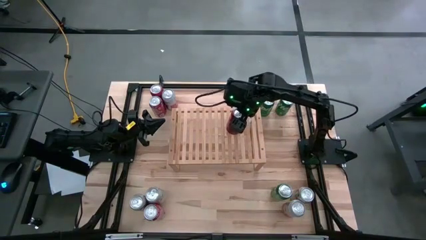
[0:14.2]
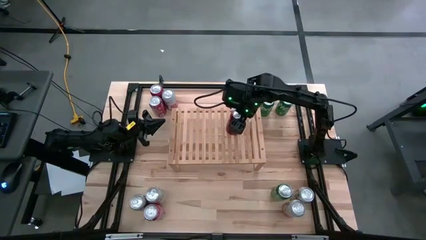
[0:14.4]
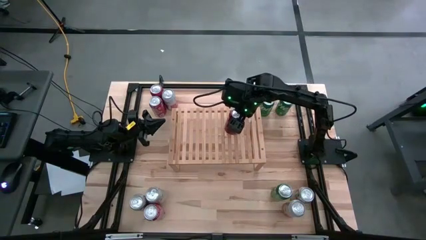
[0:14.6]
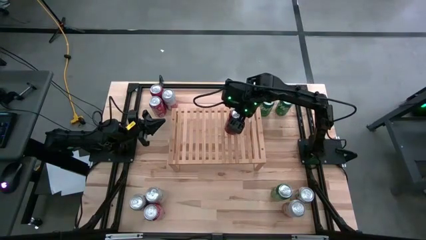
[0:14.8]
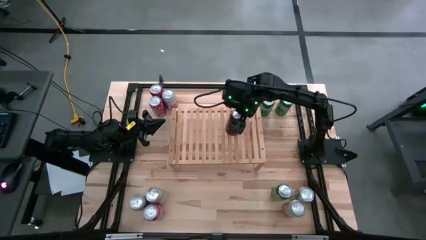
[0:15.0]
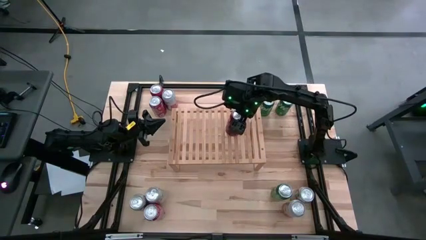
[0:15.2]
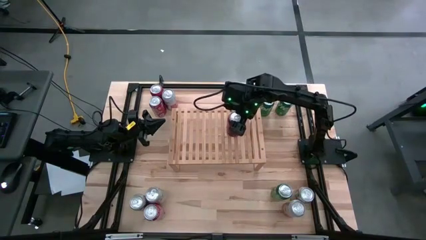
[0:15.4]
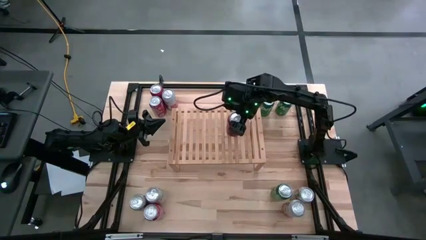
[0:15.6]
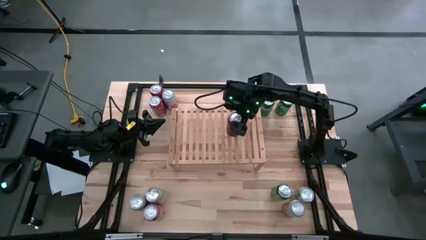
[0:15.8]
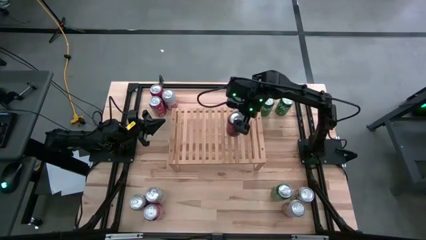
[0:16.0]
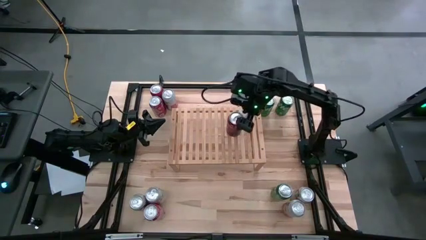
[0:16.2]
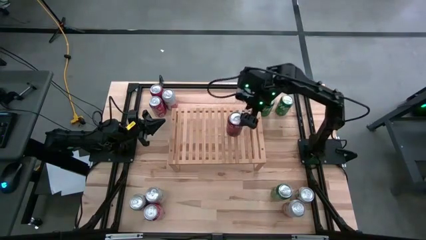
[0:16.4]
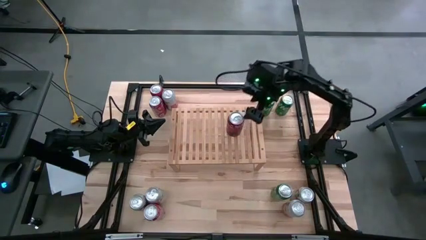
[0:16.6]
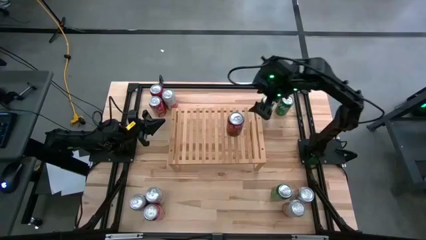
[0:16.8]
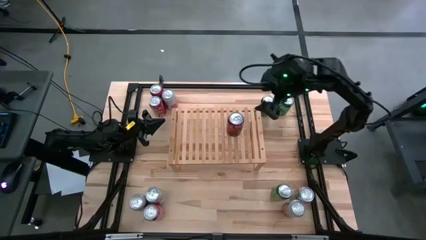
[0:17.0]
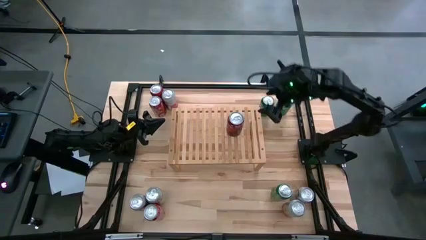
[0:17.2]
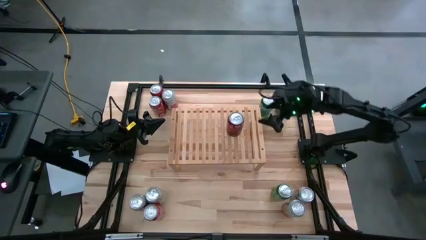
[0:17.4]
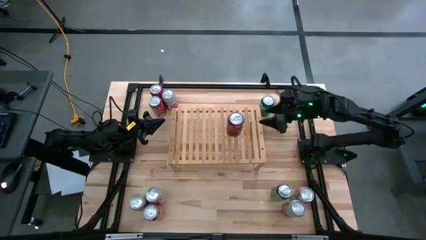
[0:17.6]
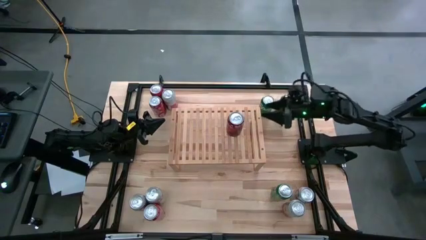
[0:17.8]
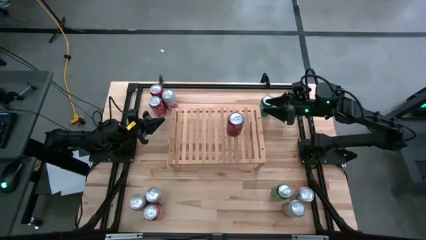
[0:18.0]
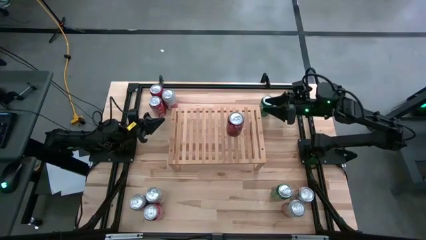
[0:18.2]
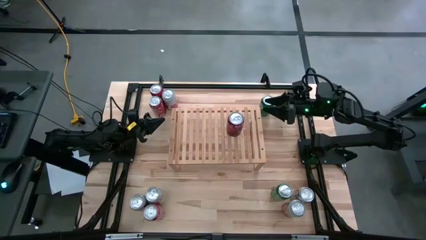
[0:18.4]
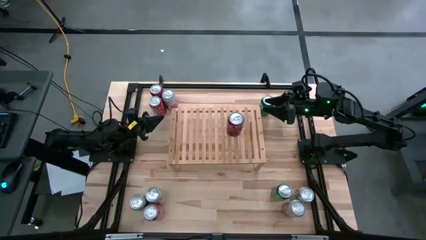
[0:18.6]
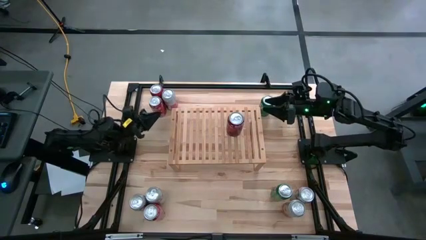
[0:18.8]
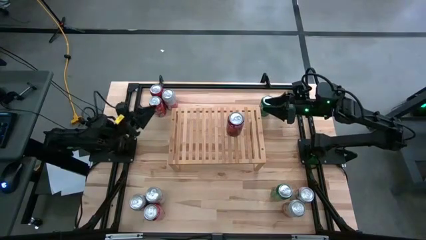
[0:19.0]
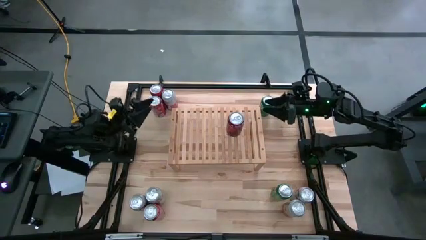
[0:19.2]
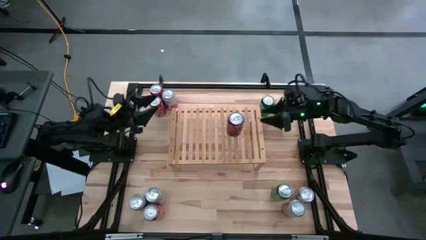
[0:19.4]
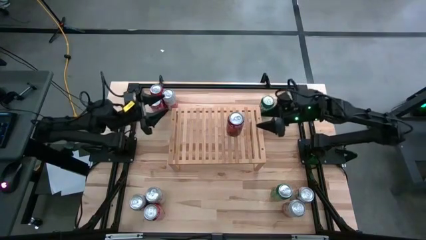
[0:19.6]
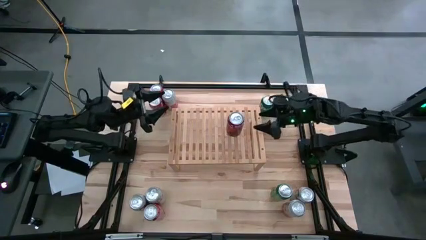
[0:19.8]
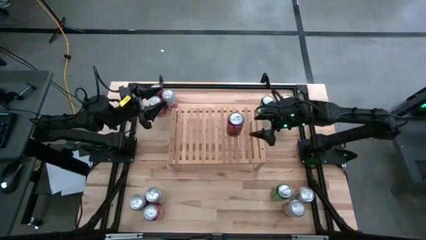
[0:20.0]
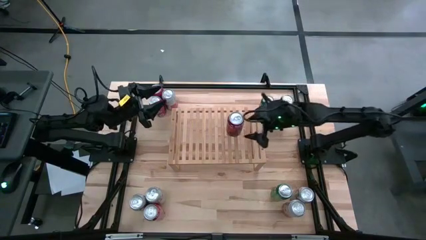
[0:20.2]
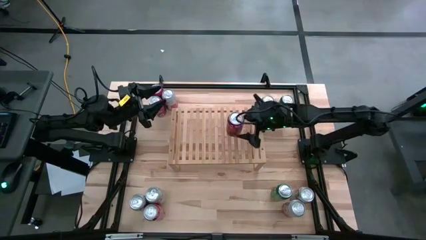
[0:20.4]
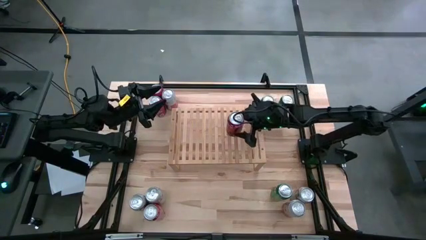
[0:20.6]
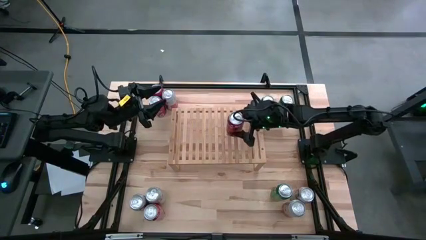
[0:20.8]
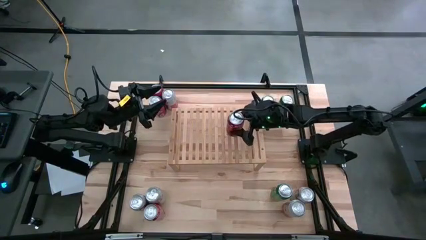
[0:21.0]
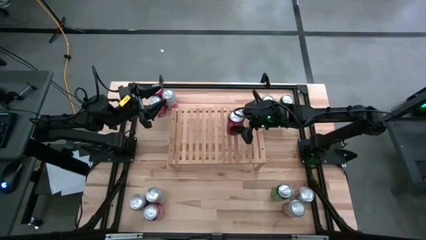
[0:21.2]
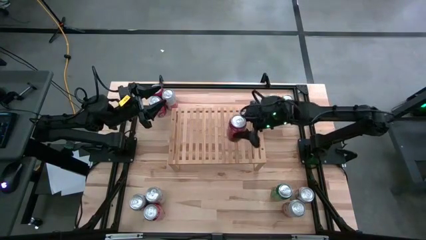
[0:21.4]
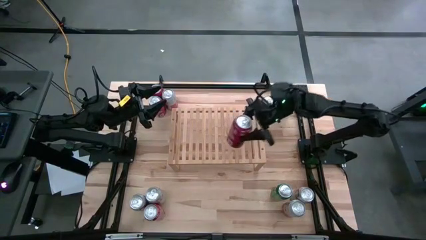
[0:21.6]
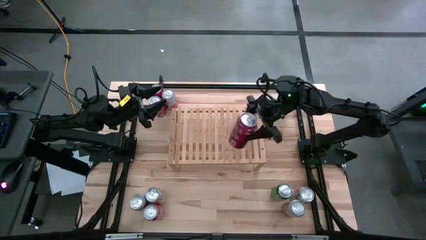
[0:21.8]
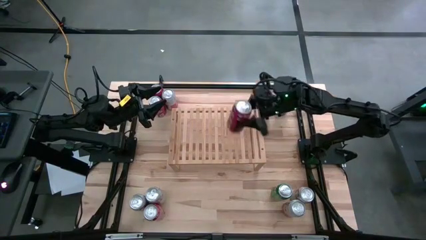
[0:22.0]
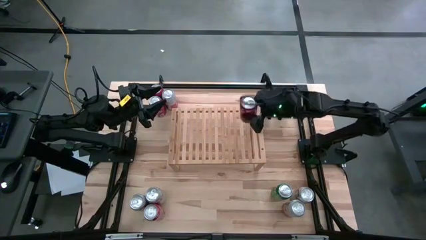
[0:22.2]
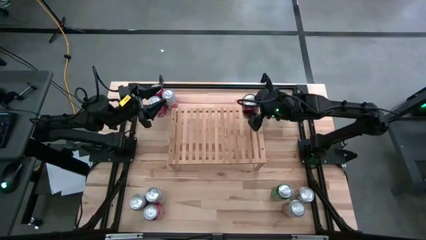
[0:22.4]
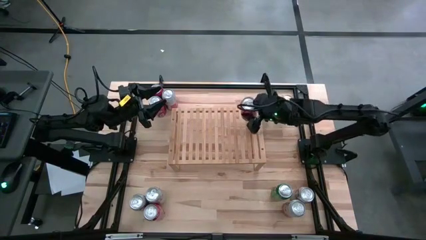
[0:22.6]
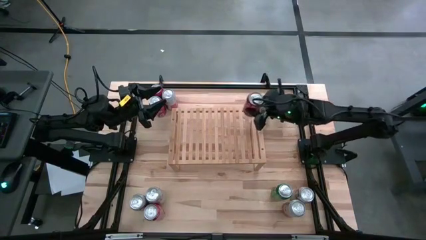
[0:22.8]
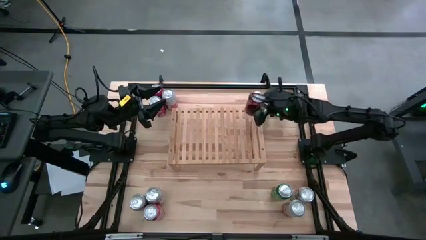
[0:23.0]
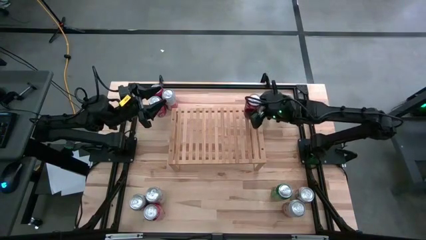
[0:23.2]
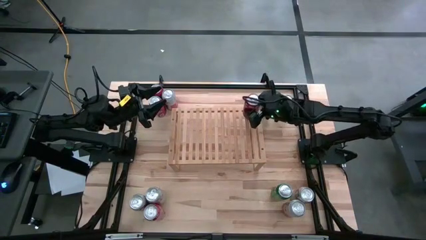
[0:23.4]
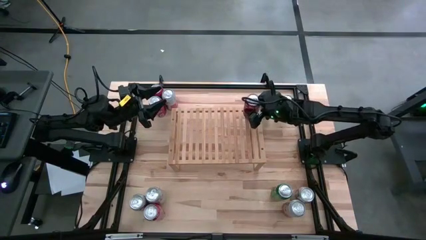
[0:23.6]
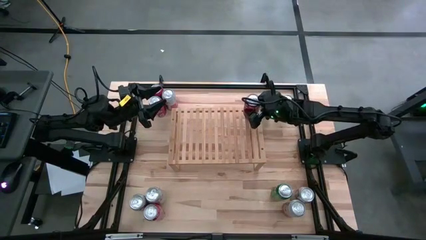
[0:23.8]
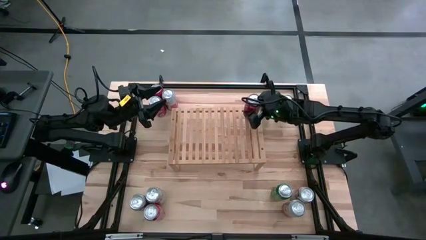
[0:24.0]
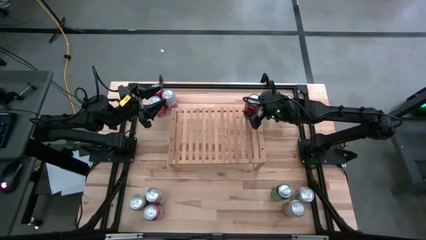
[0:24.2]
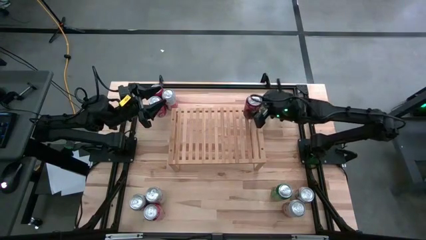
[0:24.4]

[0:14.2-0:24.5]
Task: Place canned beverage on shelf
Put the top right red soda can on the shelf

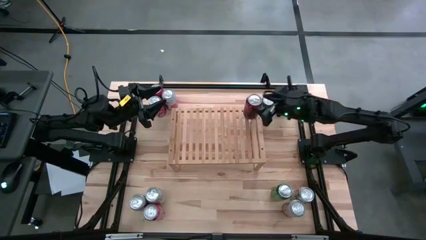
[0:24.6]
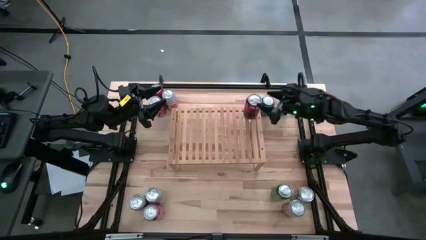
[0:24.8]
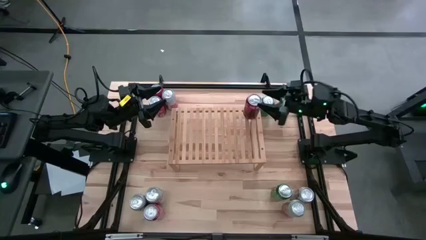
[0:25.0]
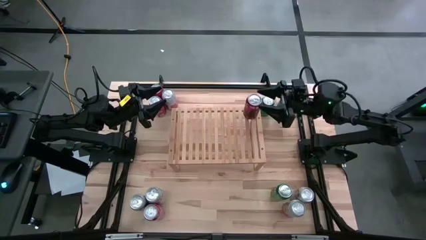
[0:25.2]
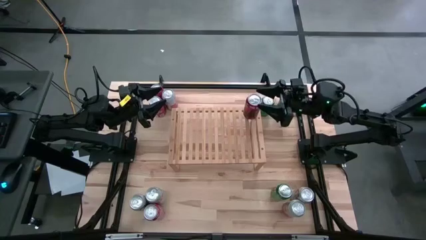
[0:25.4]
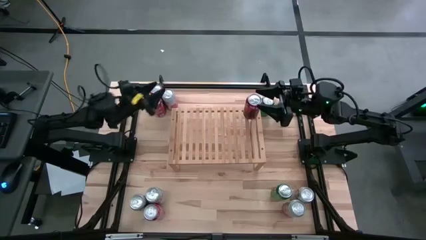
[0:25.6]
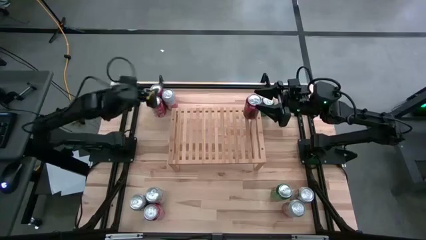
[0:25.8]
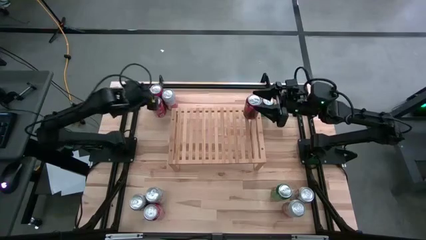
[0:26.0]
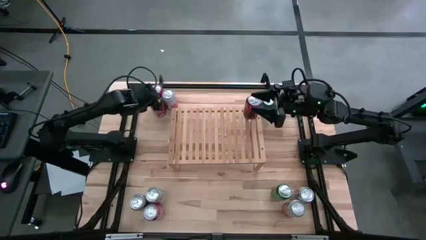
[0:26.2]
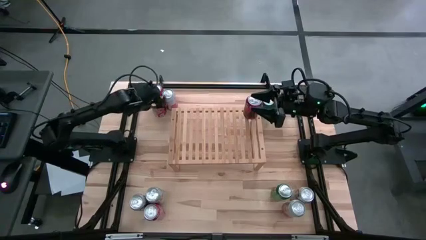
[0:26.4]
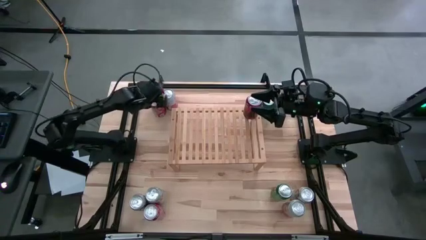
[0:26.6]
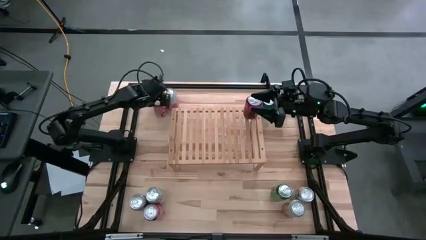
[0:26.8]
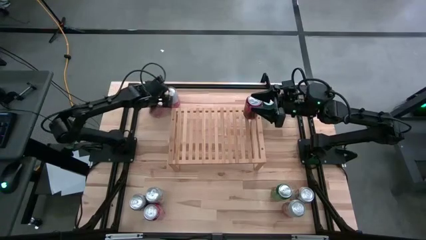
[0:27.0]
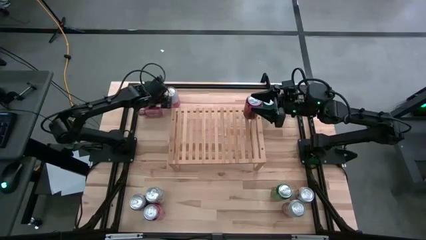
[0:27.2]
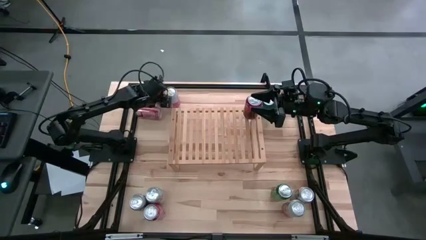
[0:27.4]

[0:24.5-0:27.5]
Put the top left red soda can on the shelf

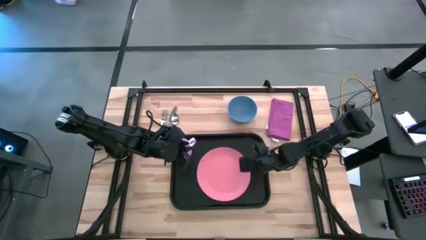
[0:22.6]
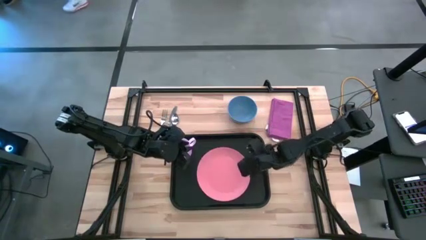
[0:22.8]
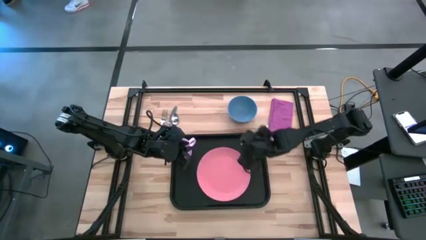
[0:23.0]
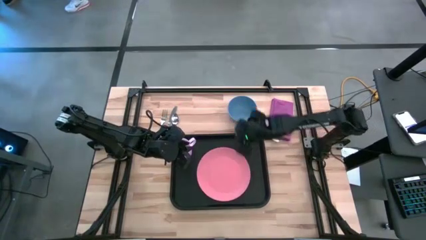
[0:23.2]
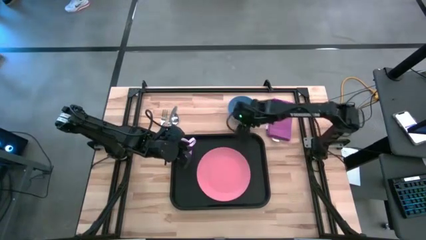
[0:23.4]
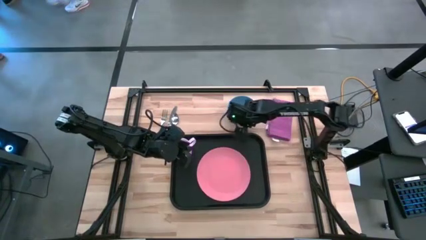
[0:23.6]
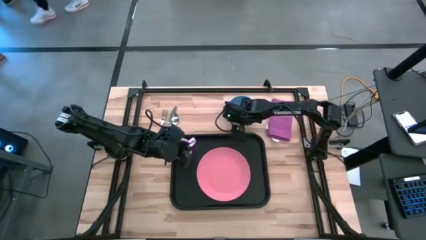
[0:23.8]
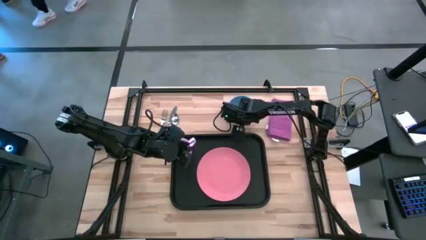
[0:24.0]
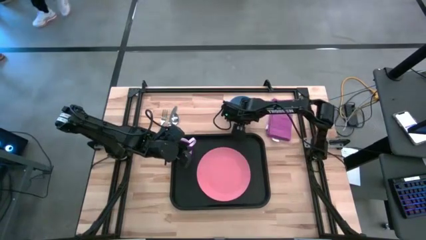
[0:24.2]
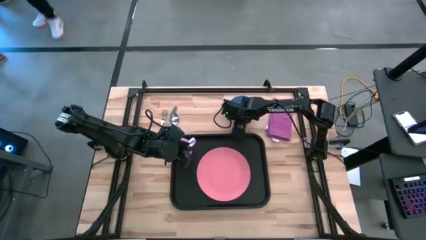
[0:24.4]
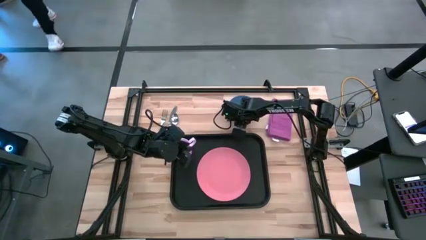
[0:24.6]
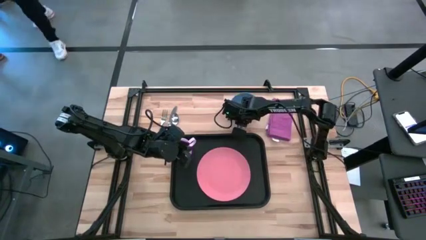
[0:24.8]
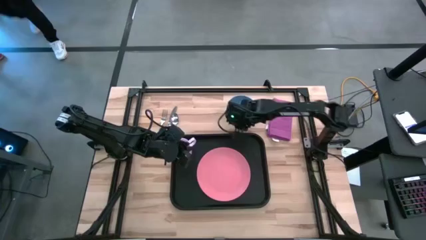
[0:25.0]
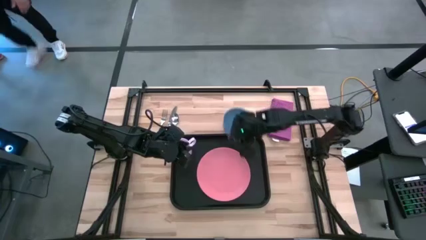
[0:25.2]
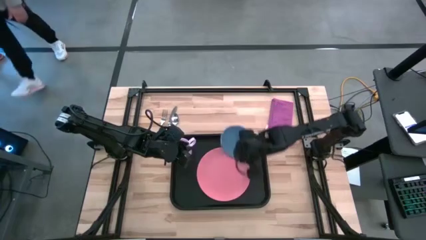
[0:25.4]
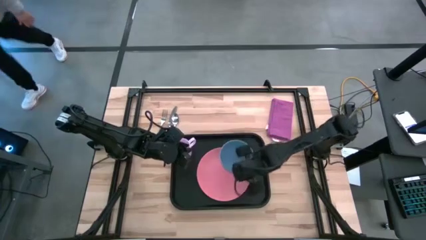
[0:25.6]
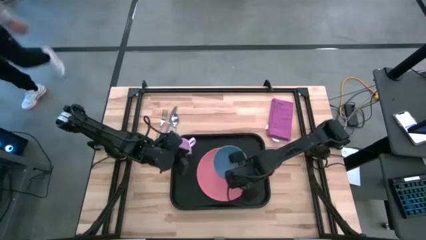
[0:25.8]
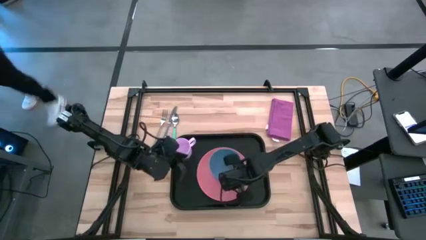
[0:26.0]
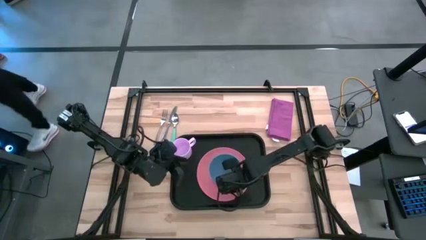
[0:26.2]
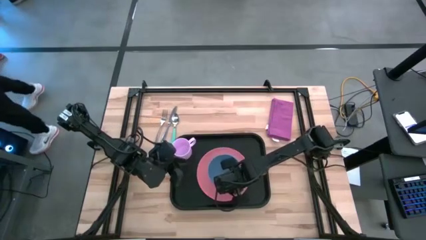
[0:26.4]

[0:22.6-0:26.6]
Task: Set up tray
Put the blue bowl on top of the pink plate on the black tray
